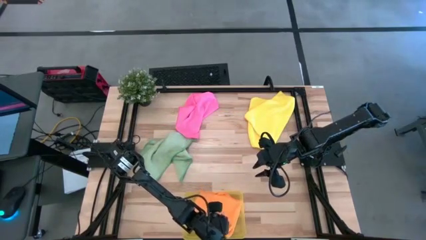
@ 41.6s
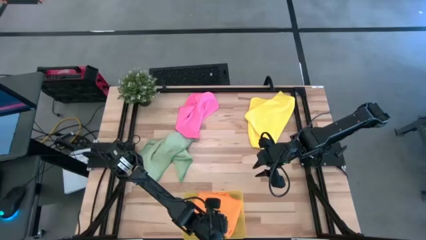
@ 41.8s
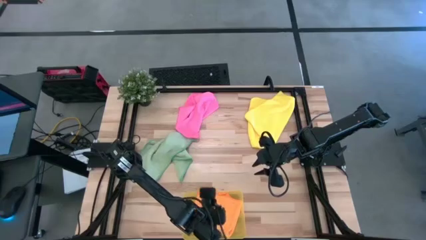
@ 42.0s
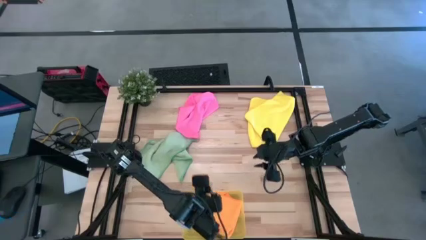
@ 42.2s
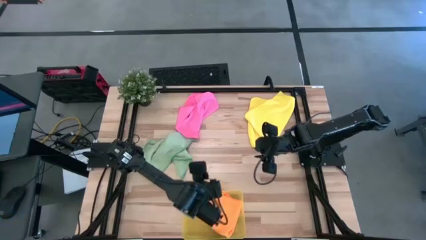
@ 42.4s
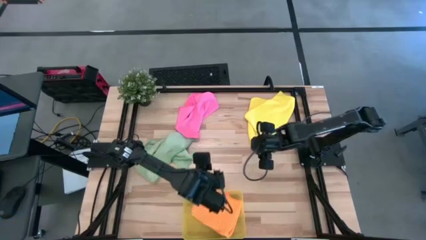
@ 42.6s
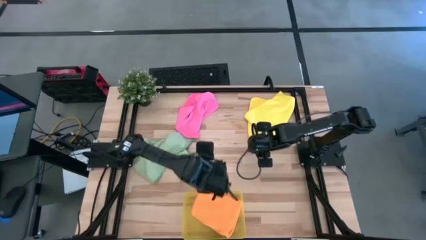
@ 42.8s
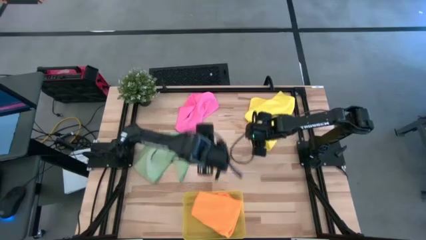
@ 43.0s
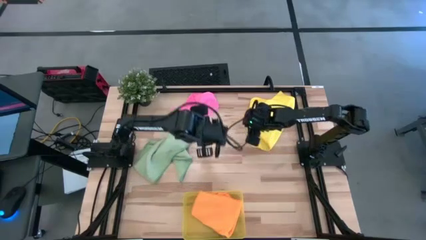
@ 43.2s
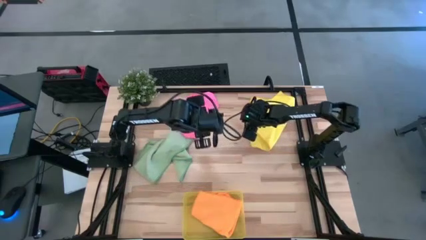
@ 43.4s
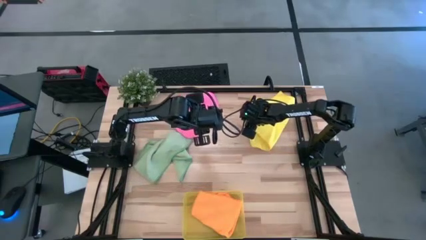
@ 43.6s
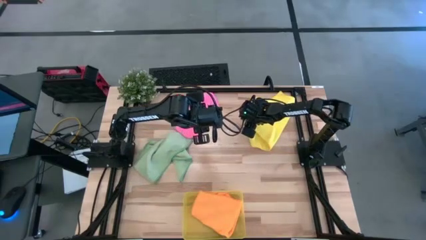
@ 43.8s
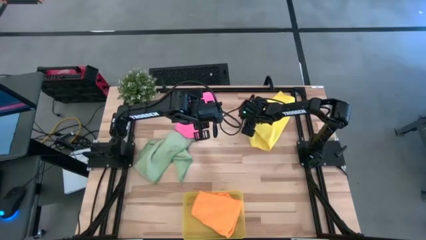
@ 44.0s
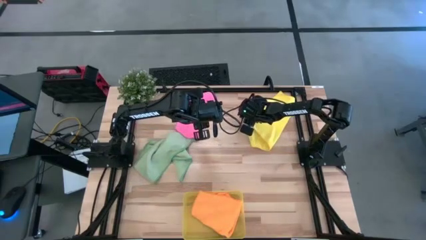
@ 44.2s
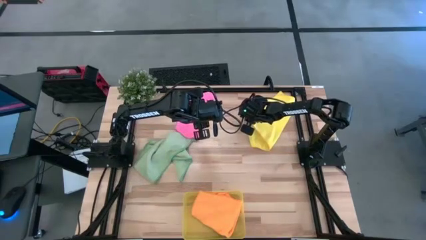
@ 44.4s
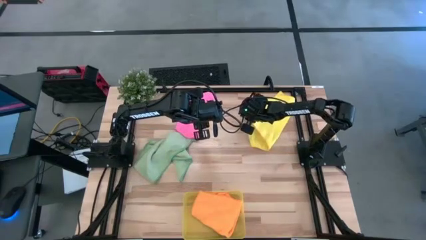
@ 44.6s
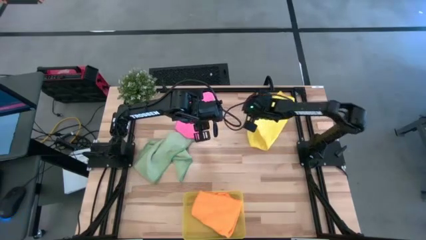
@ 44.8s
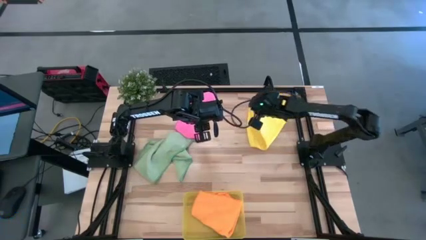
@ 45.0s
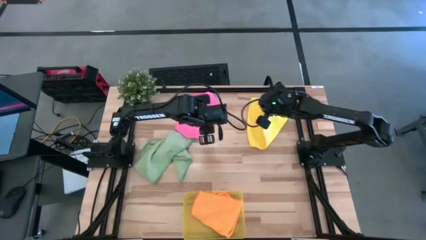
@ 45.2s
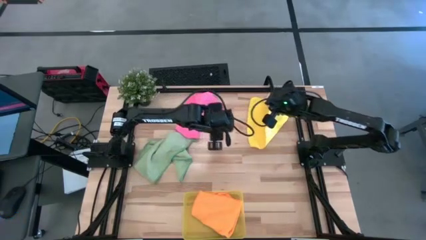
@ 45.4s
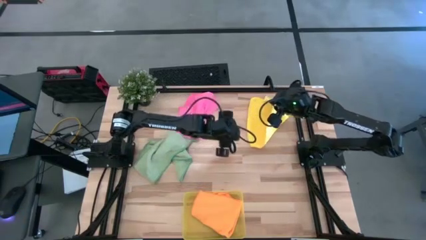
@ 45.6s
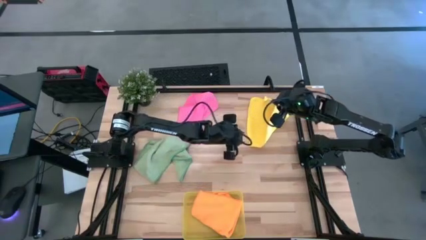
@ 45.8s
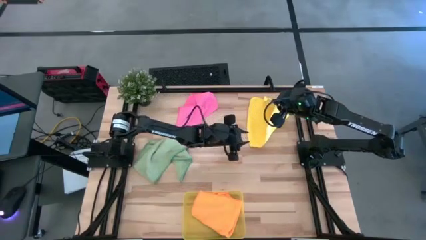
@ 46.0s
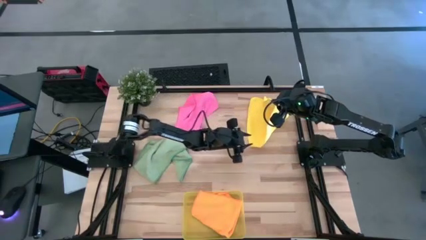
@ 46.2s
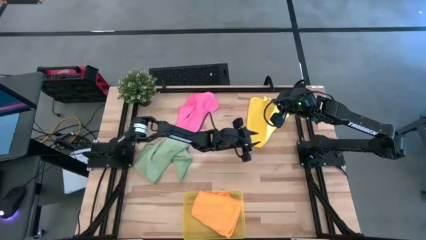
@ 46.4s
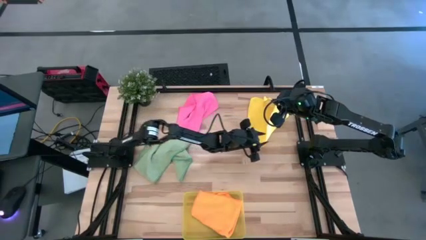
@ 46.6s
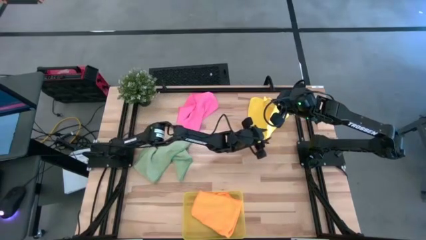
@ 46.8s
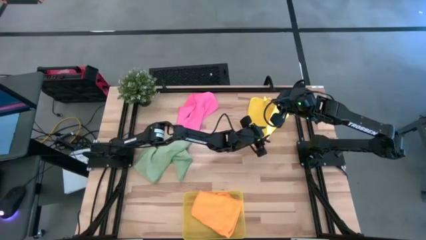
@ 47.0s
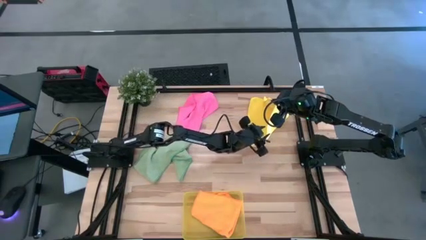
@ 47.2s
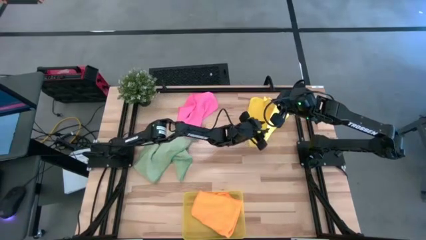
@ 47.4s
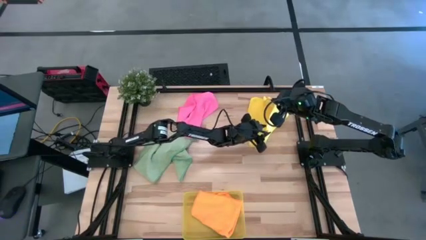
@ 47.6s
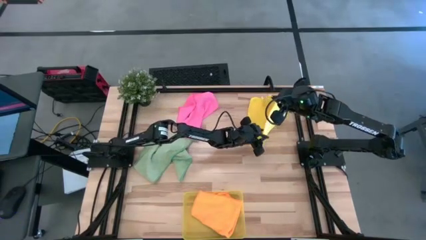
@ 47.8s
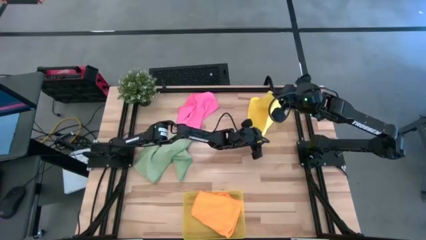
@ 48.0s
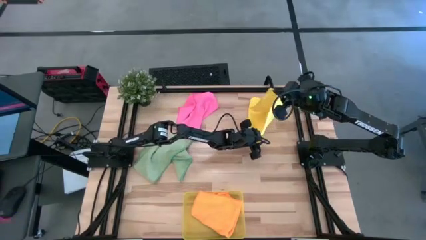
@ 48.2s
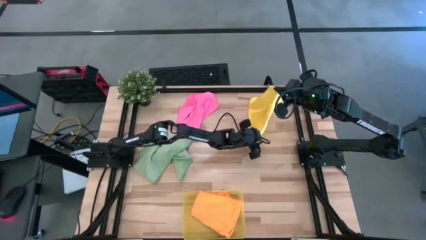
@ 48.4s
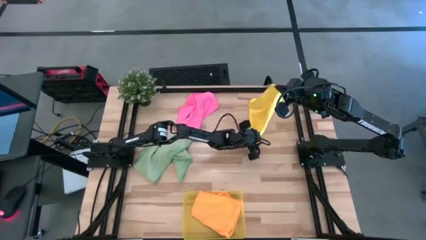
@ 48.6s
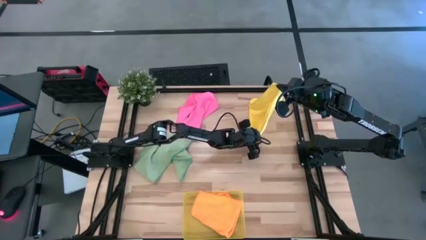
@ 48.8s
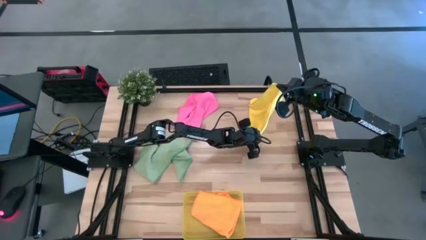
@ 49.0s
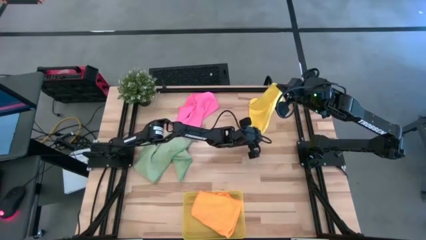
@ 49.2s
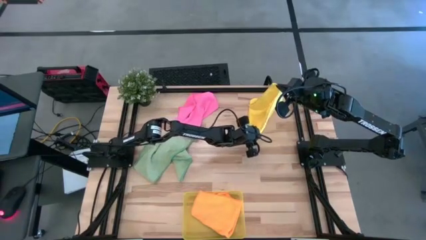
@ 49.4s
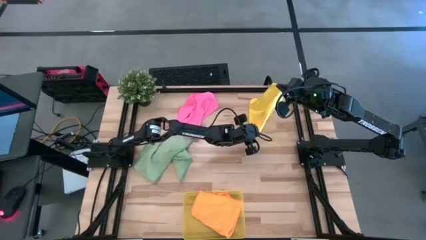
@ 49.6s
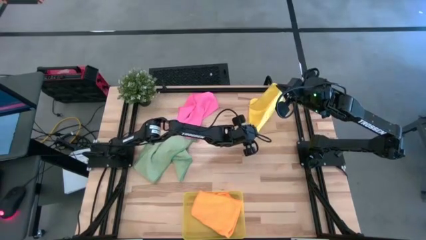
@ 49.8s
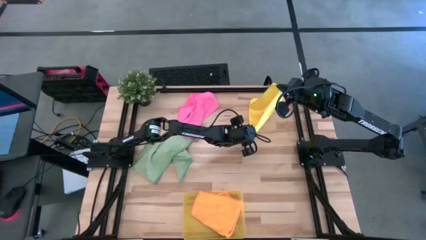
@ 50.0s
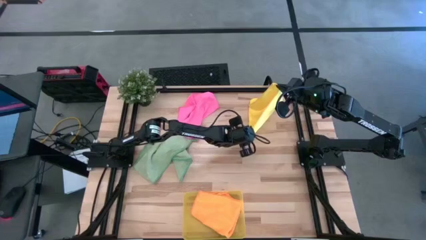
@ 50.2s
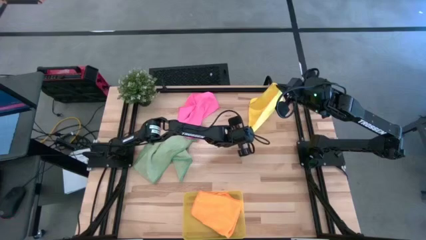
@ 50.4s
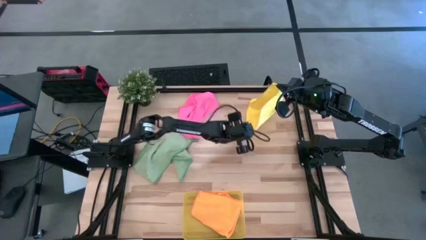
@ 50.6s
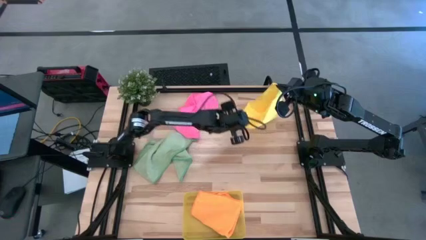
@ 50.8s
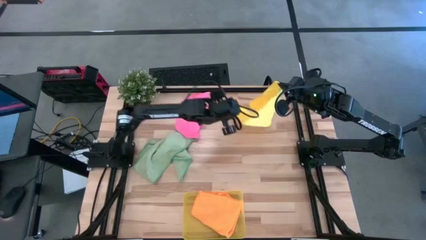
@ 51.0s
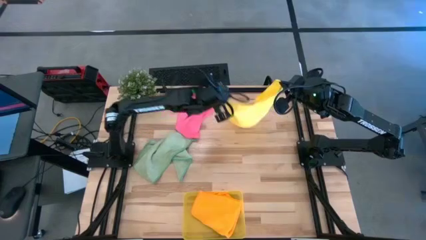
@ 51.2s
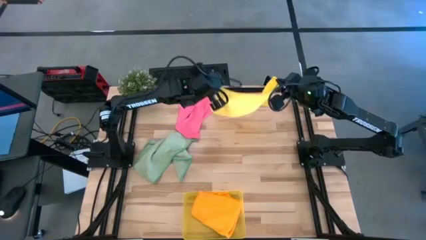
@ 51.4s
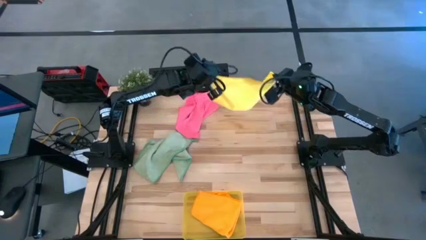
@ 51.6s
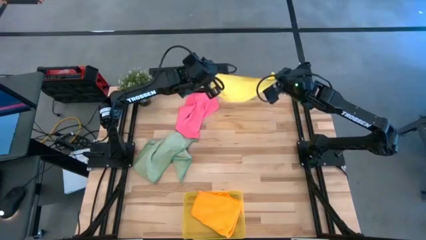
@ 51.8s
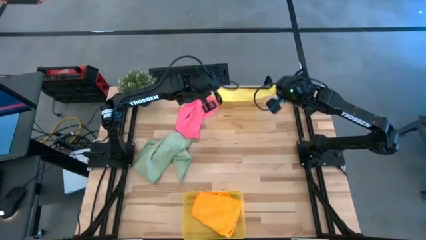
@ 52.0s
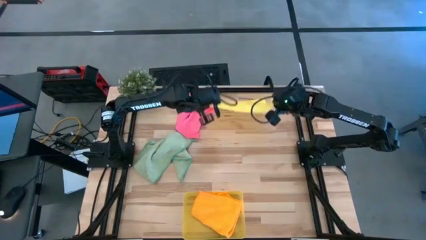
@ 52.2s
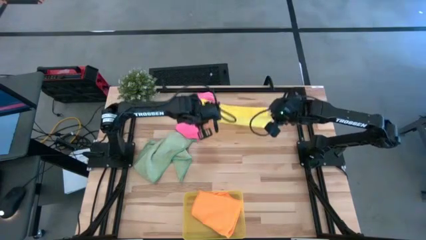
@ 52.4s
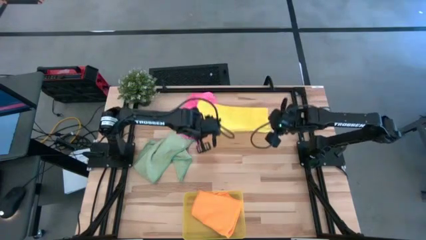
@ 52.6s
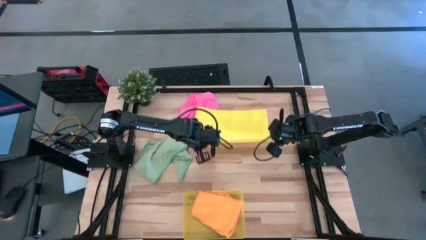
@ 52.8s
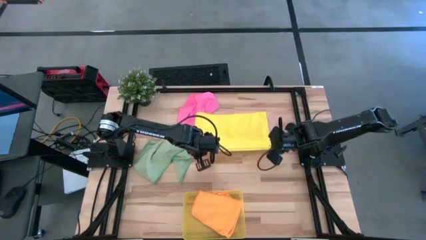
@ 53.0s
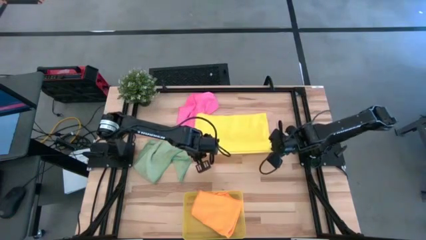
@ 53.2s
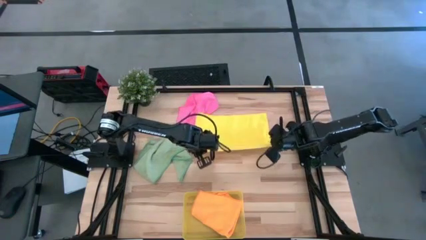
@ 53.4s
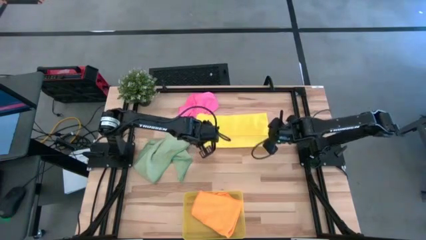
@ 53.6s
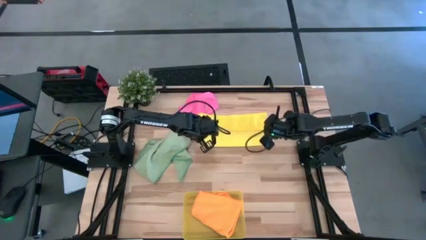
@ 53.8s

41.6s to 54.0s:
Task: Fold microfiber towels
Fold the yellow microfiber cloth

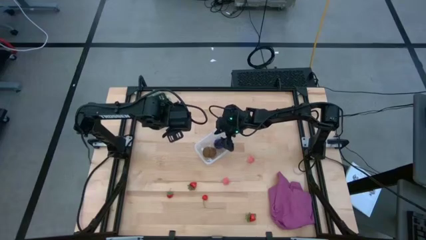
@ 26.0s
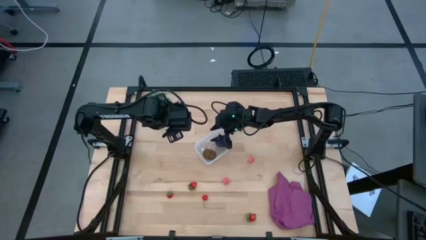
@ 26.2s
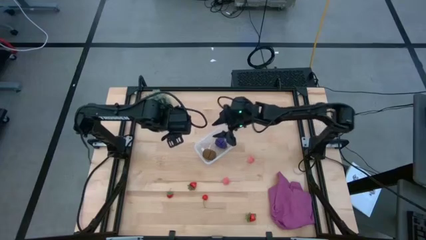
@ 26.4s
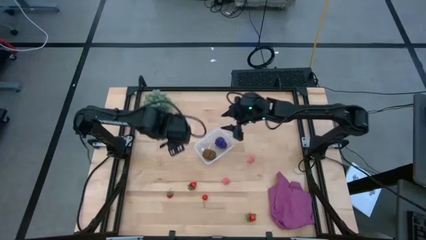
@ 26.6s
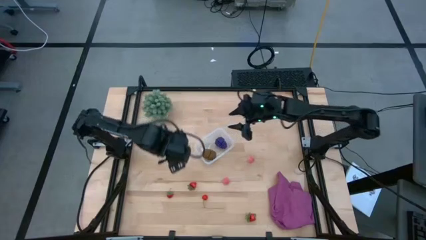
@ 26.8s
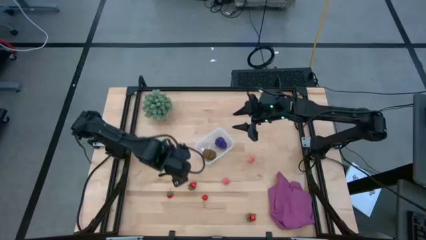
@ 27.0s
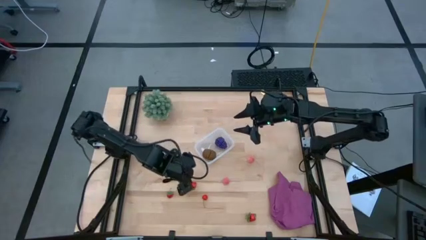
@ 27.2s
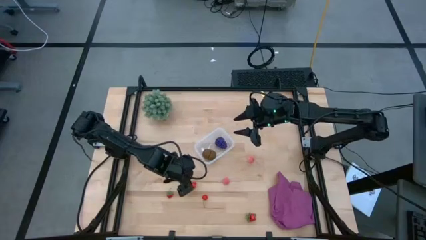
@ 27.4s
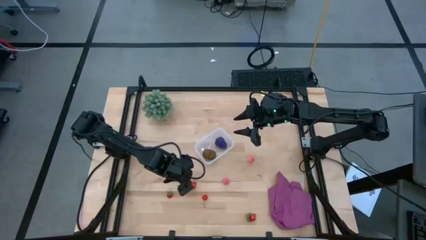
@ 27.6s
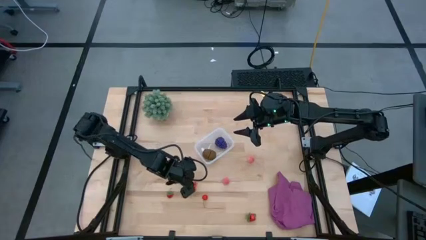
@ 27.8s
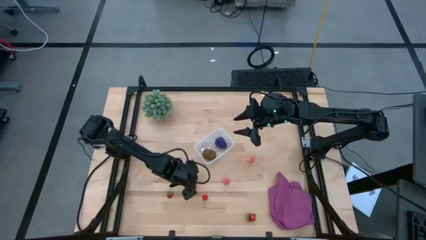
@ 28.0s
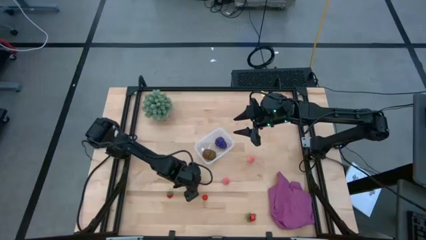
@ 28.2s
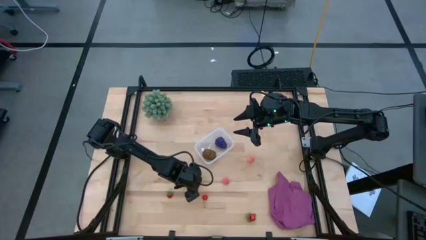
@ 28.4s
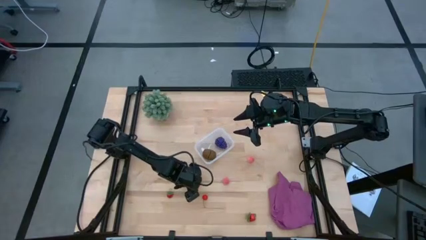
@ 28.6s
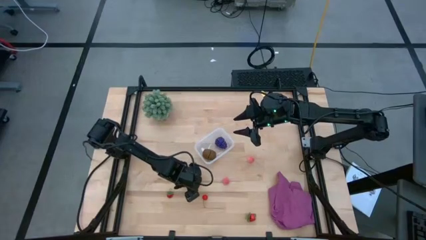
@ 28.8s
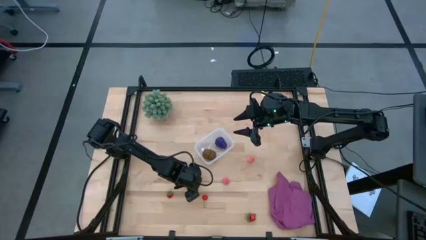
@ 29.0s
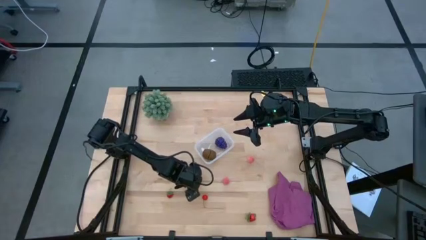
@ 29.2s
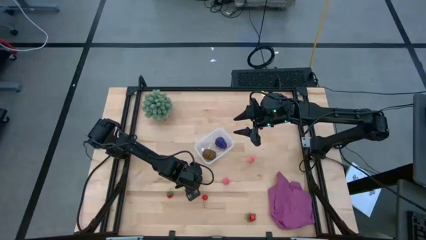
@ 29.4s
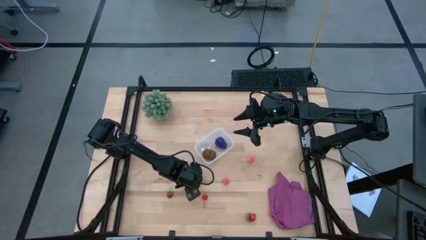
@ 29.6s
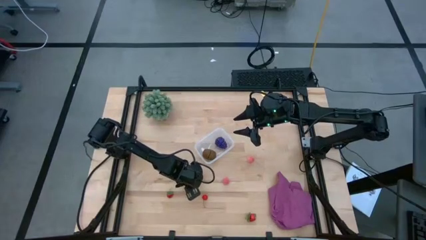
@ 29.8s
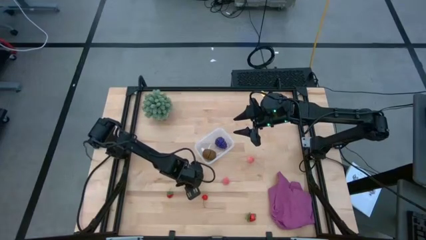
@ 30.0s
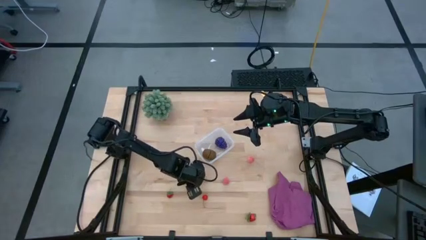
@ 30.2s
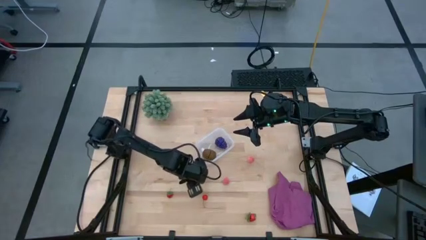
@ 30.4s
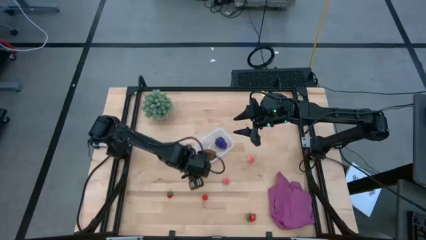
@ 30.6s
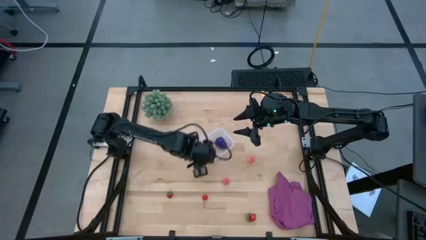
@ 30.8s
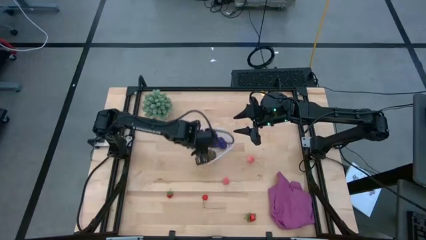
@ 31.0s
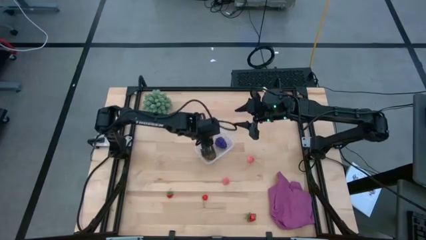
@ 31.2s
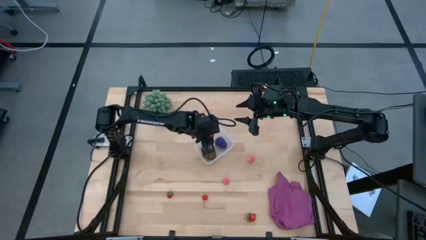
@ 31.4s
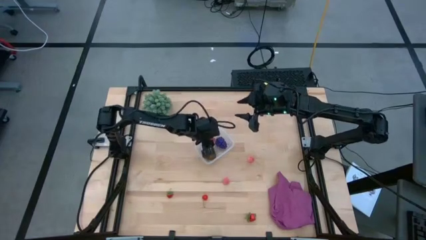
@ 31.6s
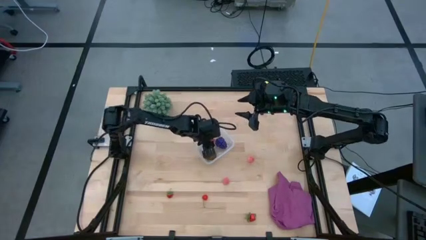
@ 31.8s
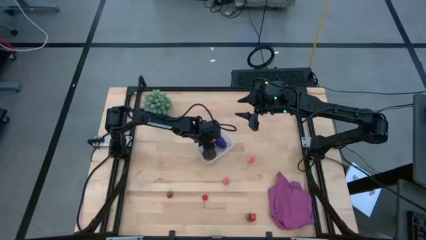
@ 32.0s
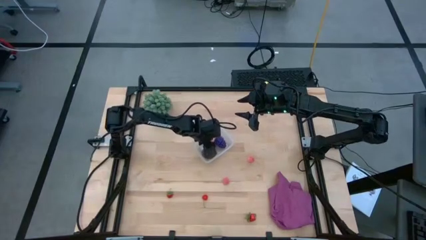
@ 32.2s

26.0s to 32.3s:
Task: Pick and placing Produce into tupperware
Put the middle strawberry into the transparent bin
